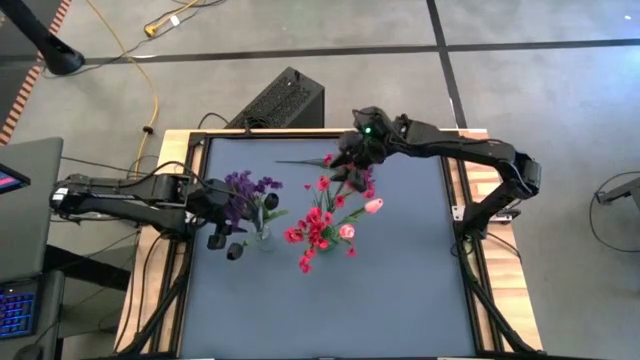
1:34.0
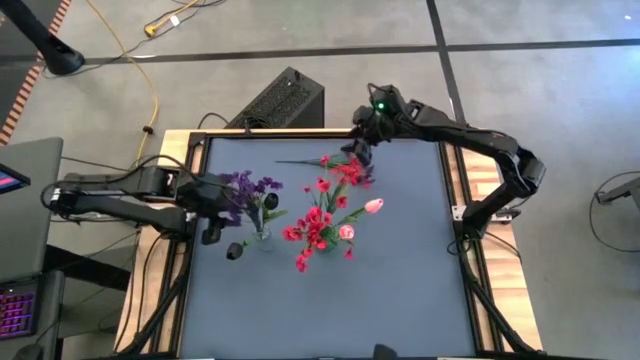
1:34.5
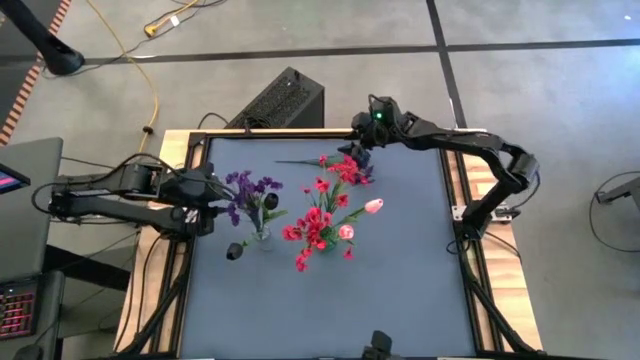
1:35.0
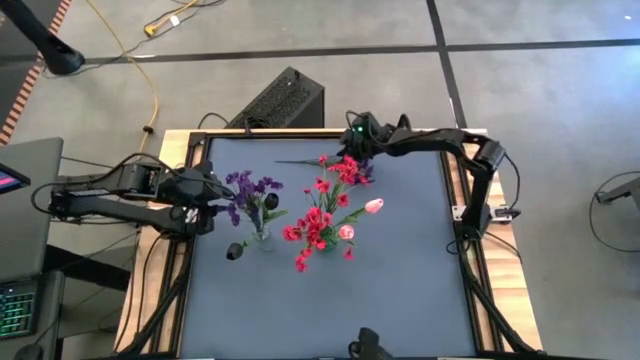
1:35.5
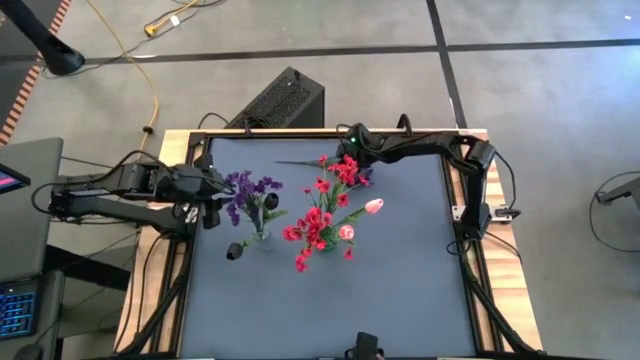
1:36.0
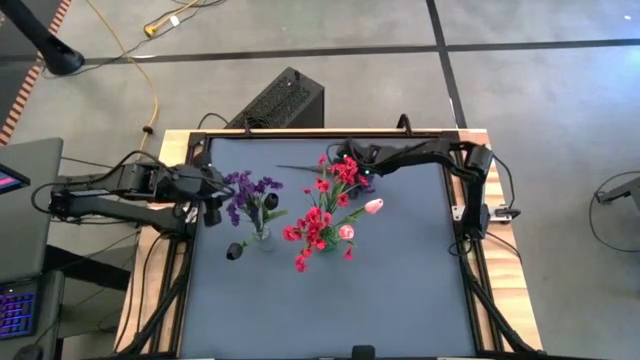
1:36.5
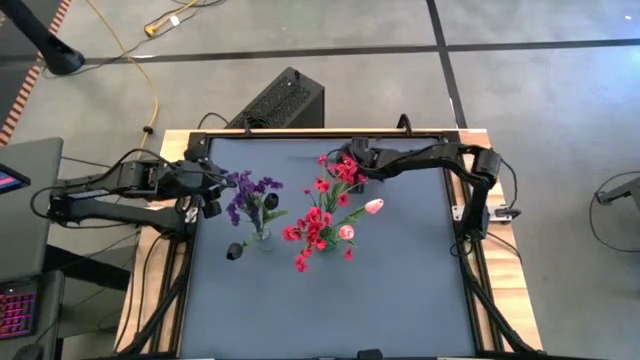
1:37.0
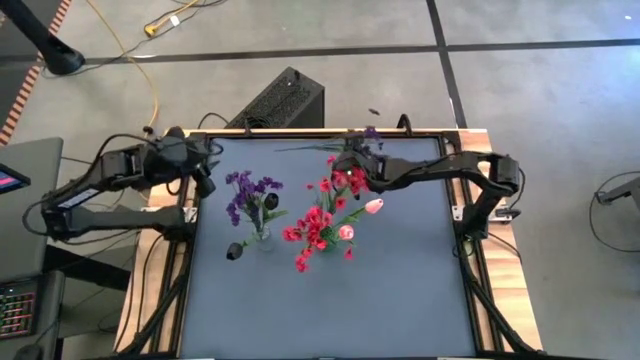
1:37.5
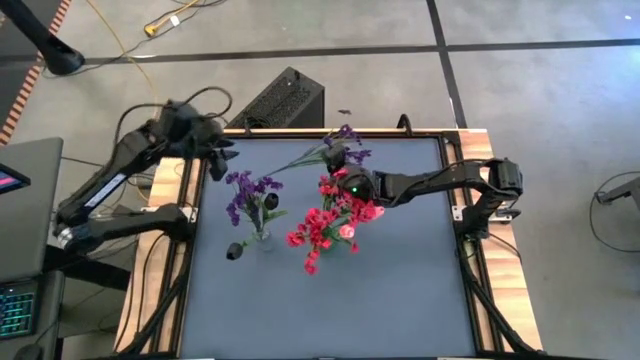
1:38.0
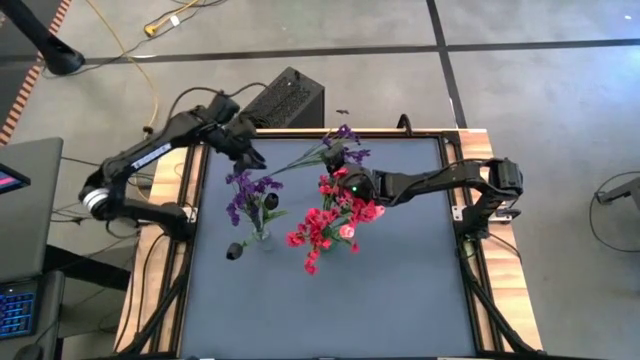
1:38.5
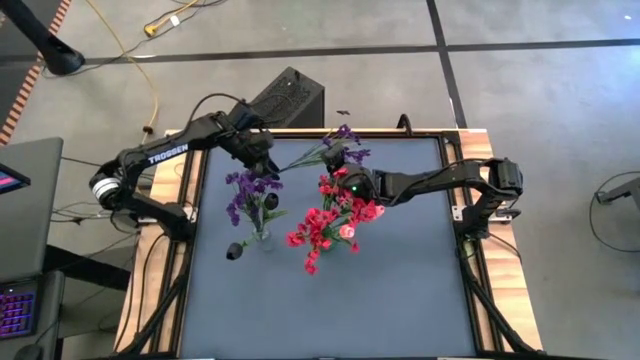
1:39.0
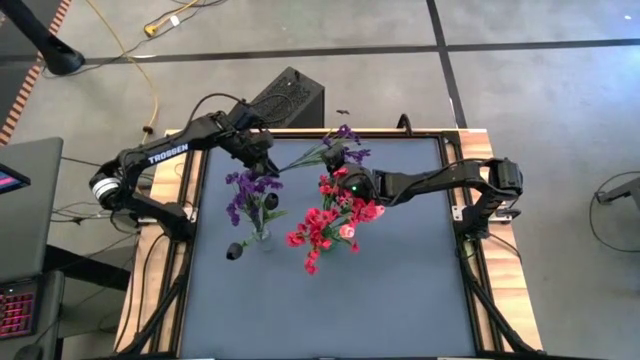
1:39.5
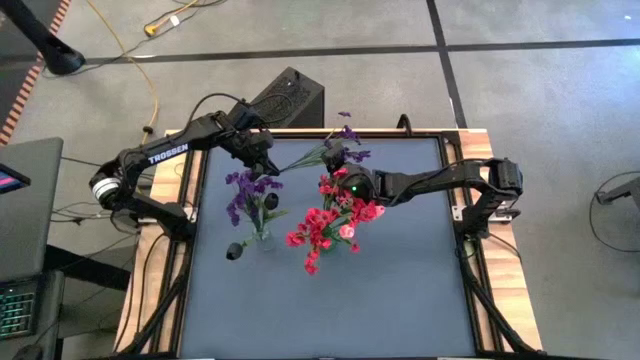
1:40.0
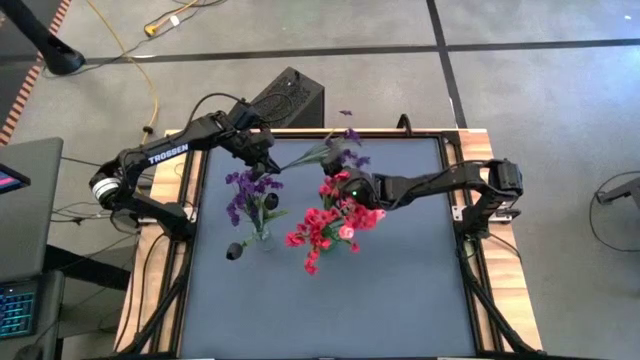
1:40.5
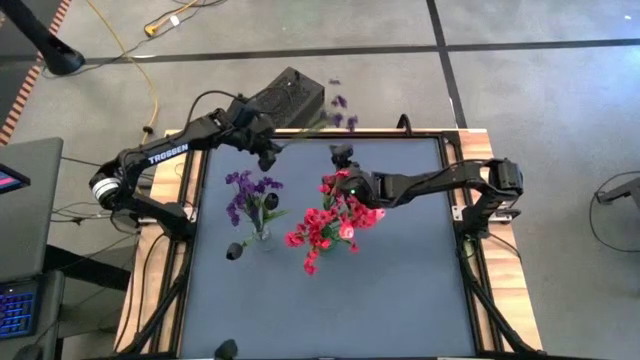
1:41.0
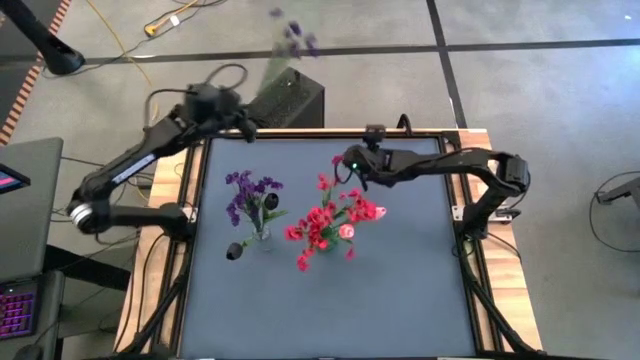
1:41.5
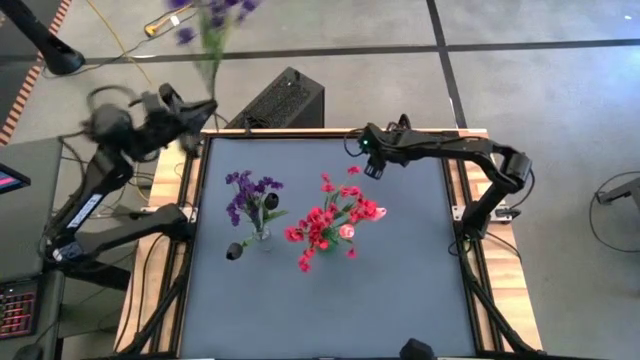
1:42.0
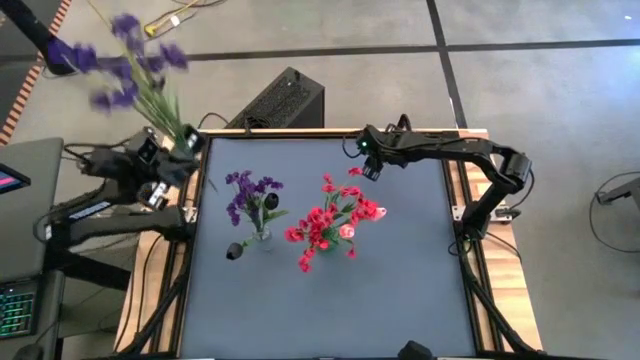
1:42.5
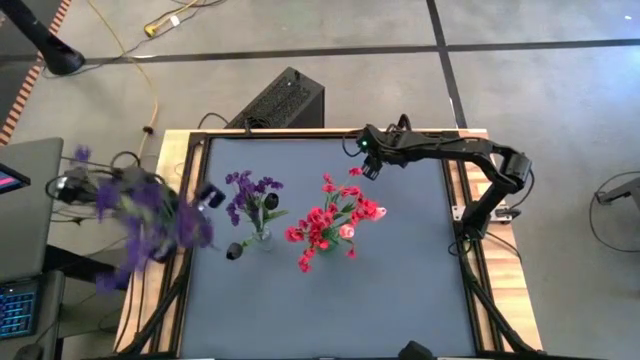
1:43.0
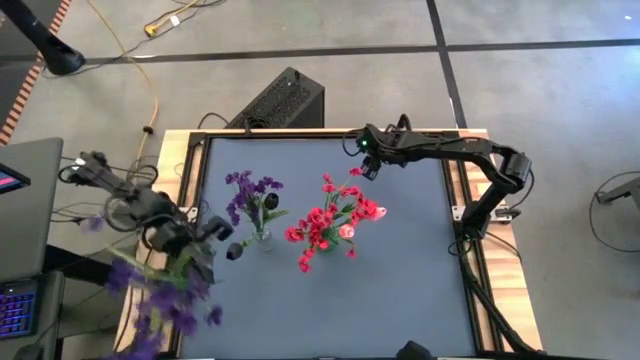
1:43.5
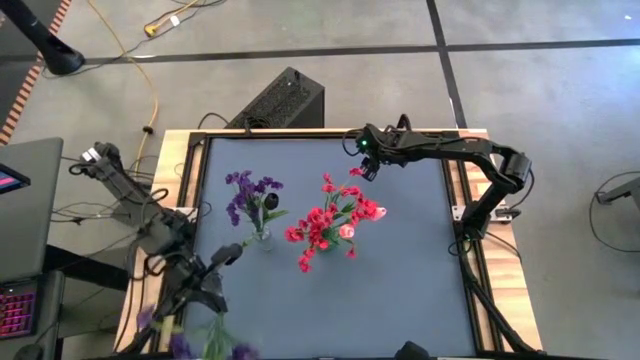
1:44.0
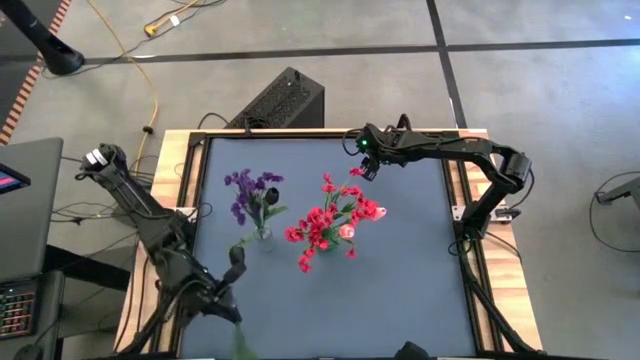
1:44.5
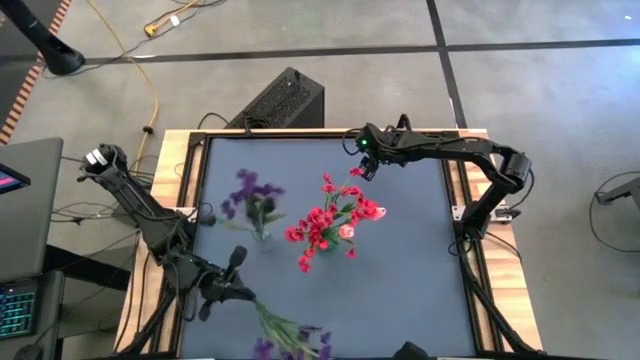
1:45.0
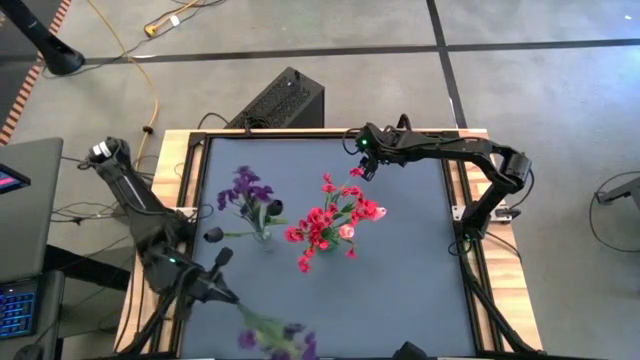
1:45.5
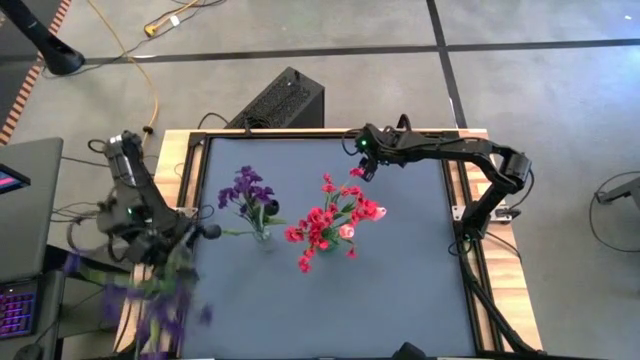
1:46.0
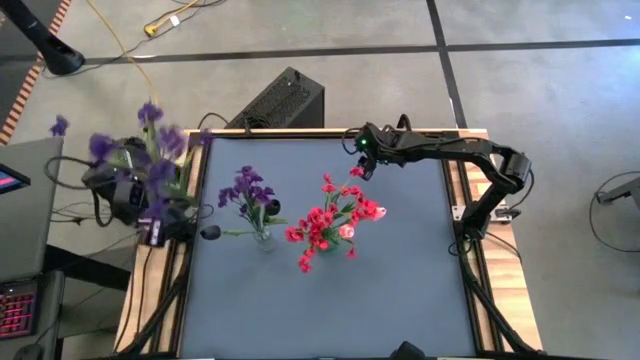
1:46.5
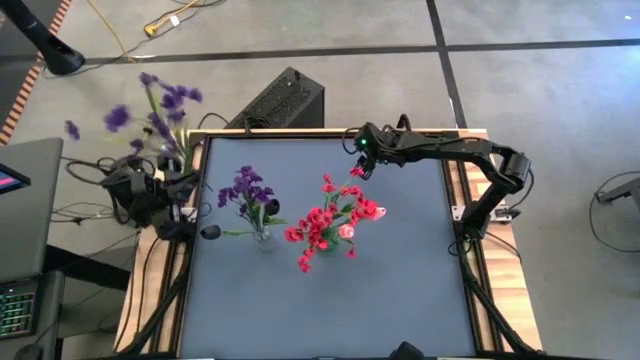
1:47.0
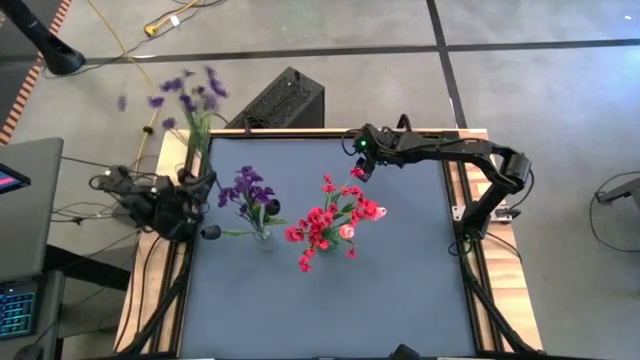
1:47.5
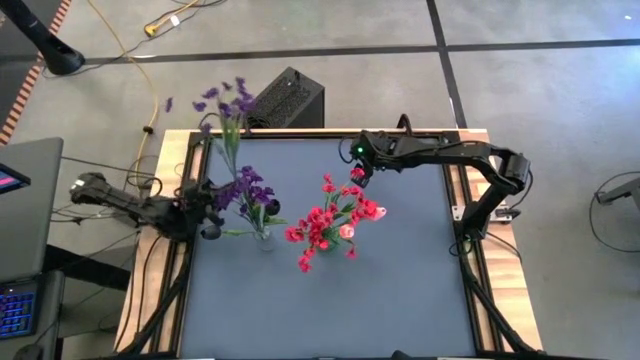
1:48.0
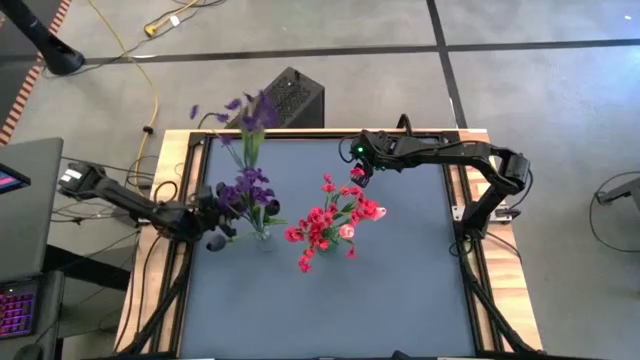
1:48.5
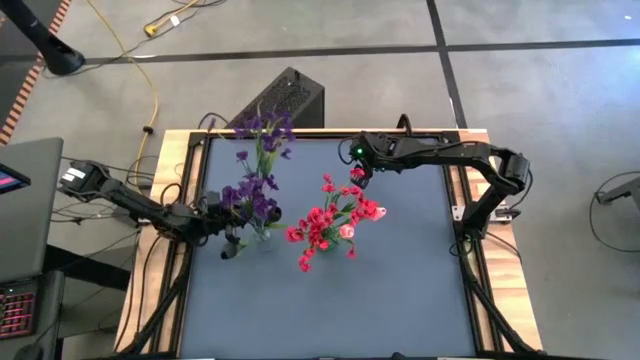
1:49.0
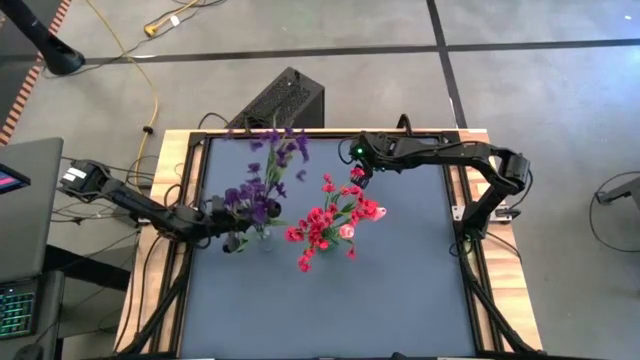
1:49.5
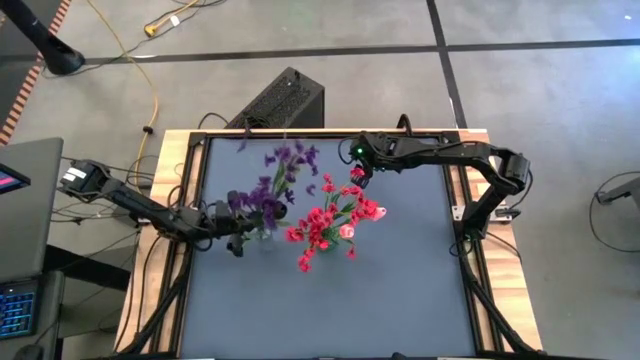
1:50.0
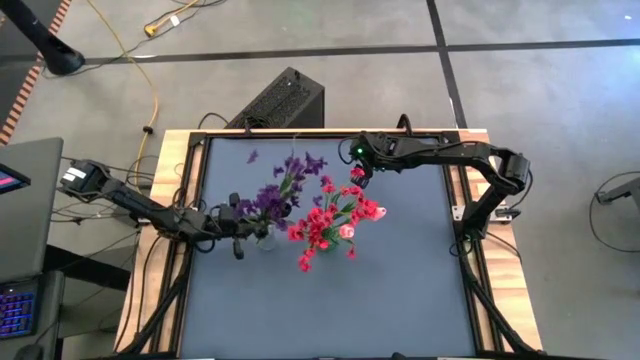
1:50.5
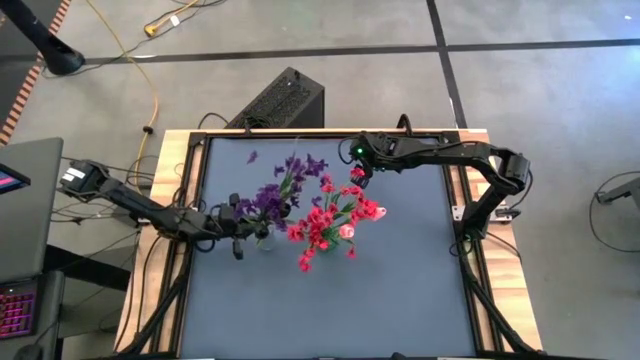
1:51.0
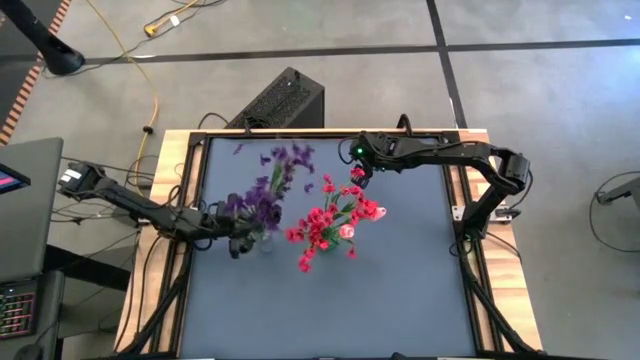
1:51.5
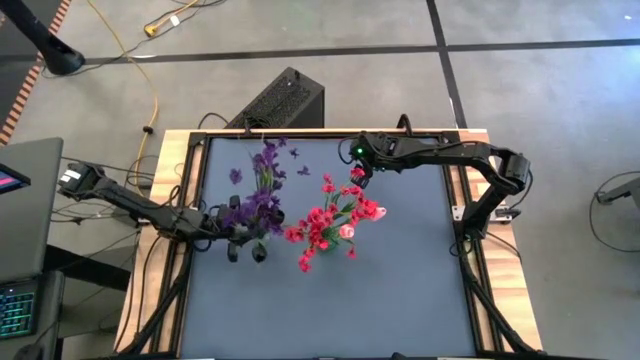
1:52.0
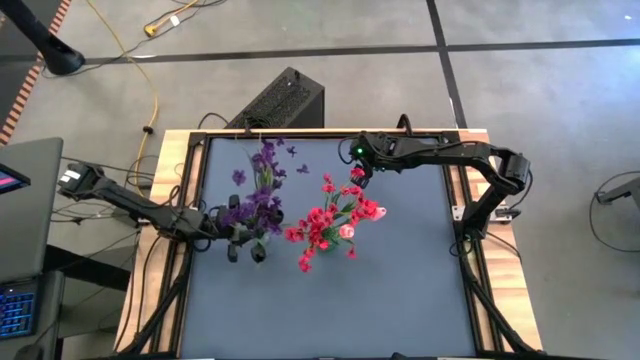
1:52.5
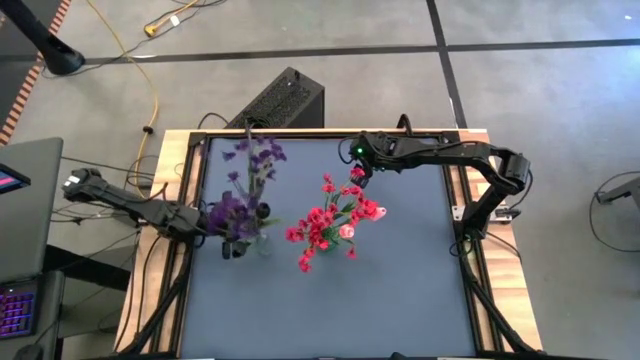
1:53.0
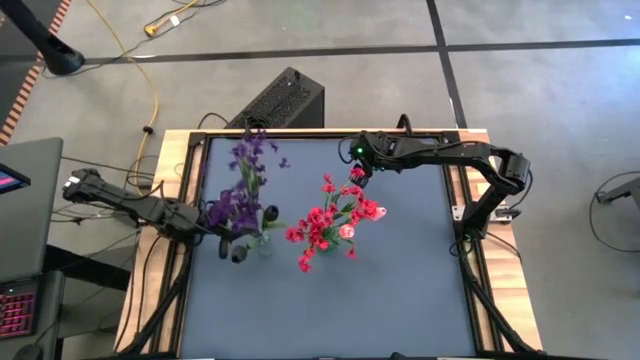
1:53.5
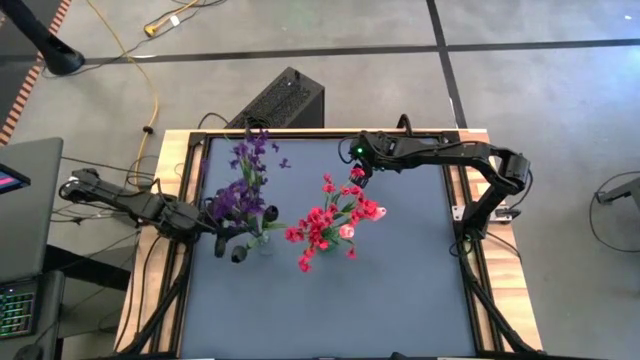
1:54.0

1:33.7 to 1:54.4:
Task: Sort flowers into vase by color
Put the violet flowers into the transparent vase
